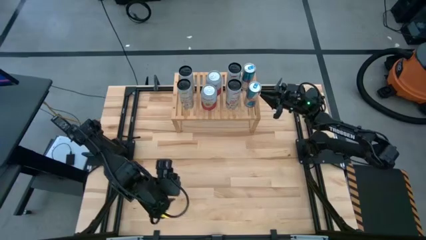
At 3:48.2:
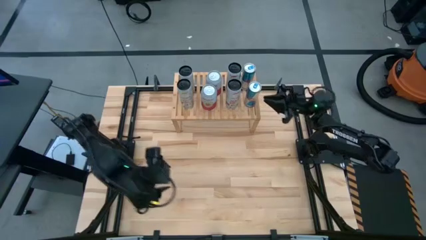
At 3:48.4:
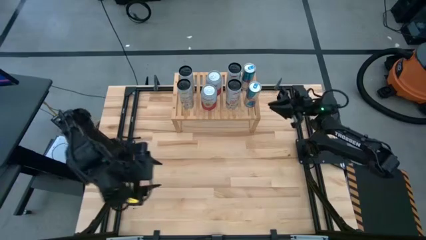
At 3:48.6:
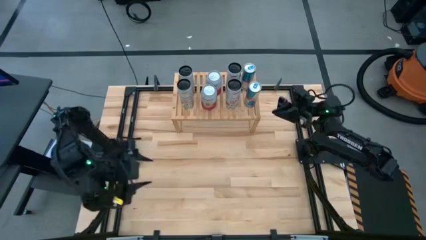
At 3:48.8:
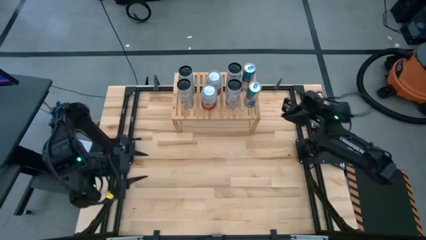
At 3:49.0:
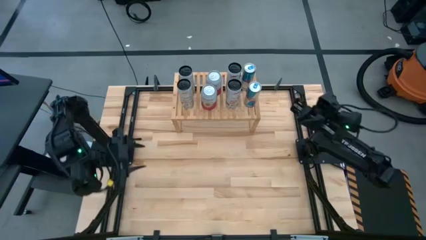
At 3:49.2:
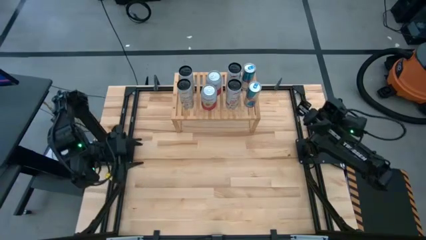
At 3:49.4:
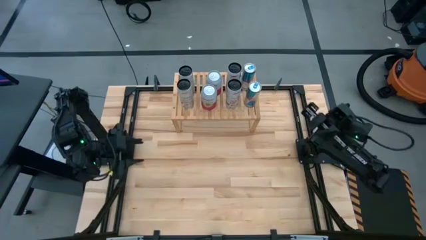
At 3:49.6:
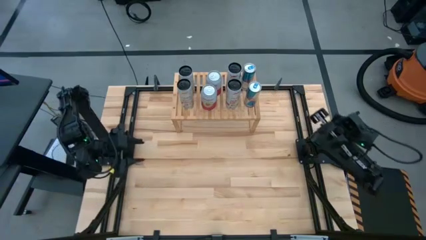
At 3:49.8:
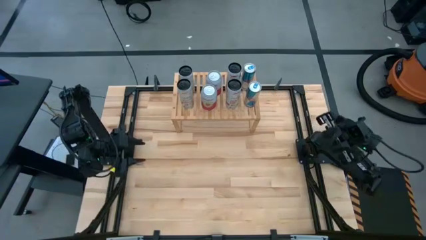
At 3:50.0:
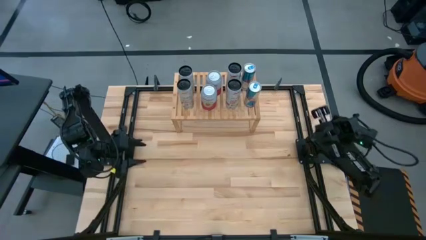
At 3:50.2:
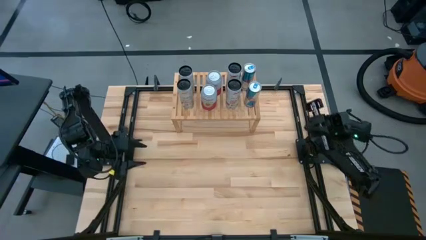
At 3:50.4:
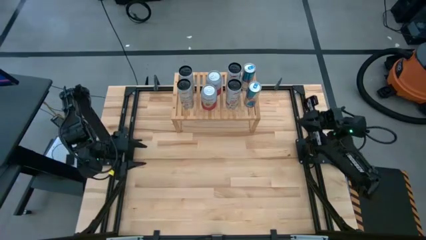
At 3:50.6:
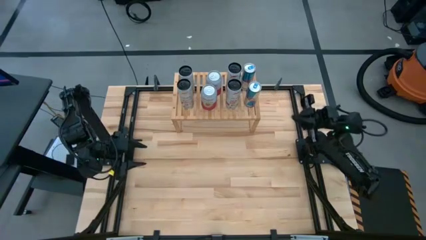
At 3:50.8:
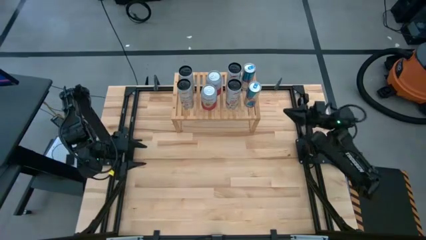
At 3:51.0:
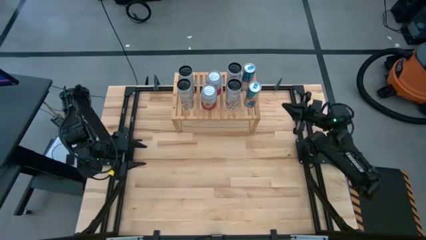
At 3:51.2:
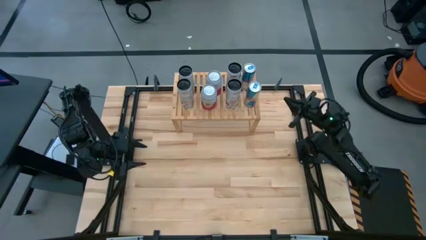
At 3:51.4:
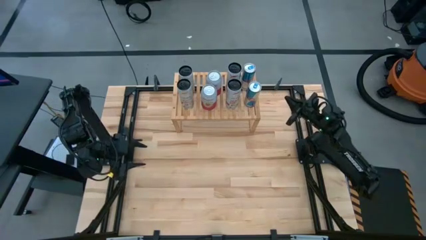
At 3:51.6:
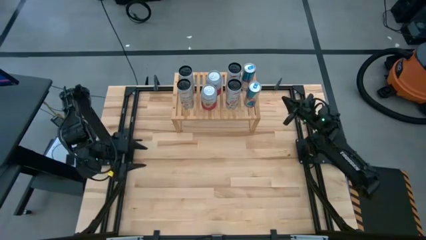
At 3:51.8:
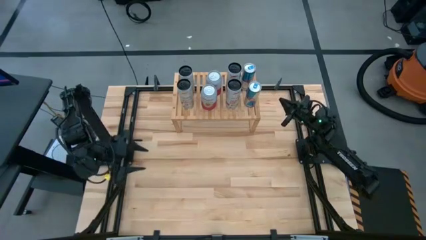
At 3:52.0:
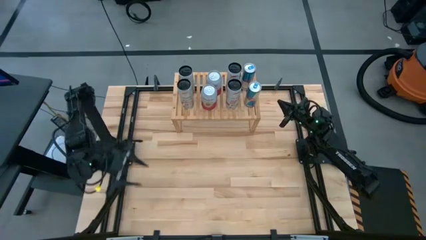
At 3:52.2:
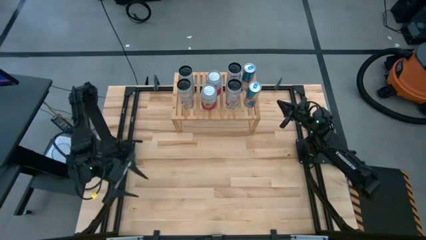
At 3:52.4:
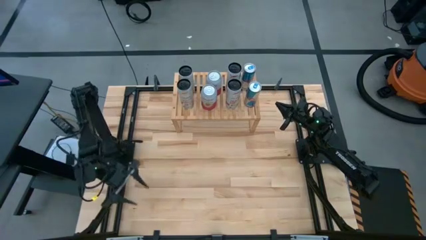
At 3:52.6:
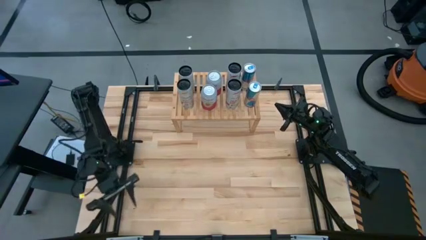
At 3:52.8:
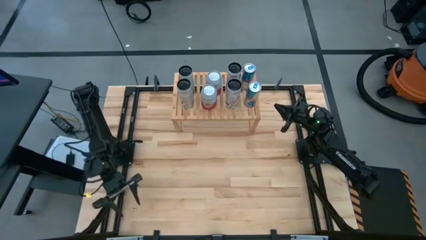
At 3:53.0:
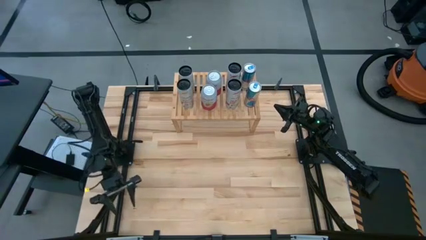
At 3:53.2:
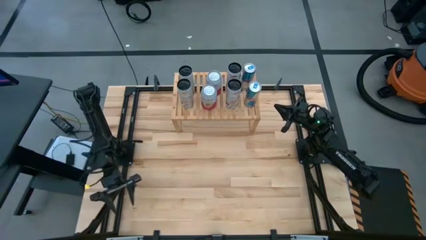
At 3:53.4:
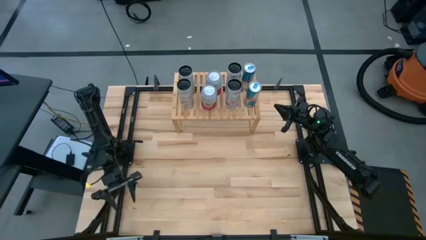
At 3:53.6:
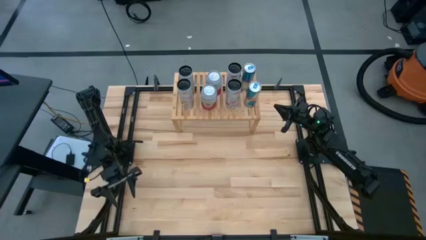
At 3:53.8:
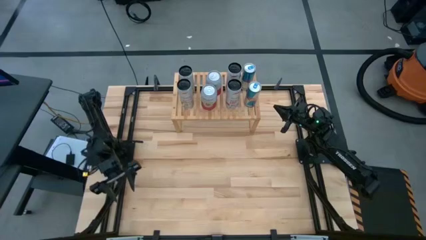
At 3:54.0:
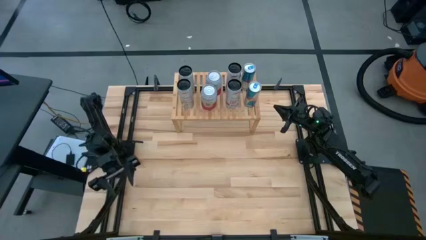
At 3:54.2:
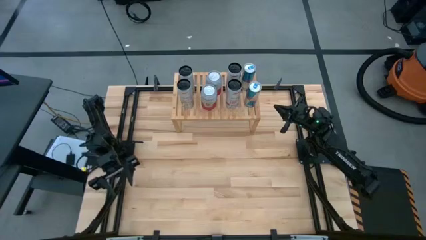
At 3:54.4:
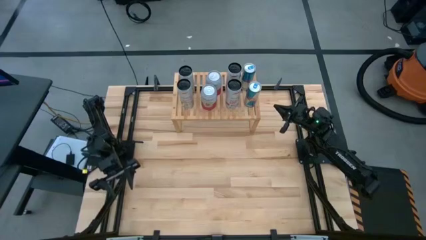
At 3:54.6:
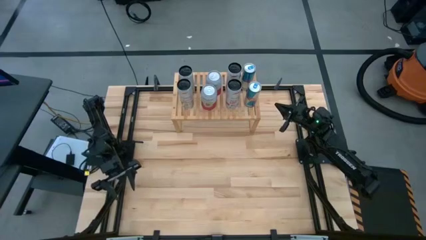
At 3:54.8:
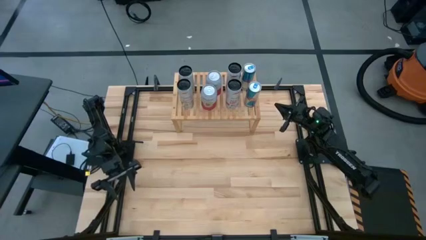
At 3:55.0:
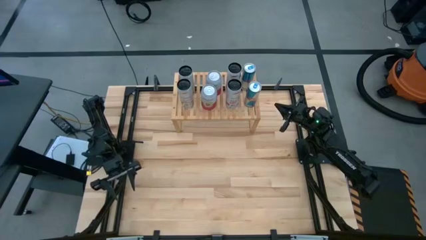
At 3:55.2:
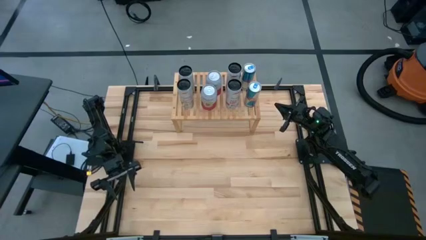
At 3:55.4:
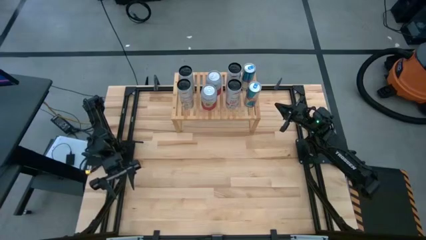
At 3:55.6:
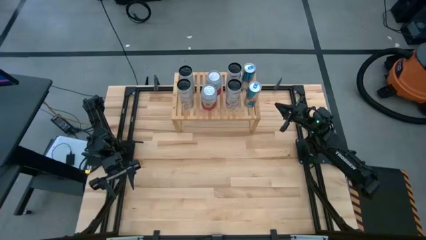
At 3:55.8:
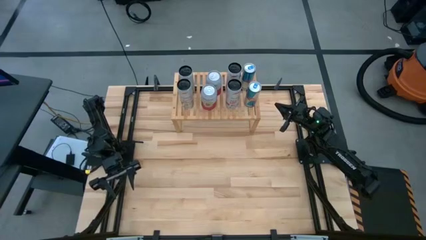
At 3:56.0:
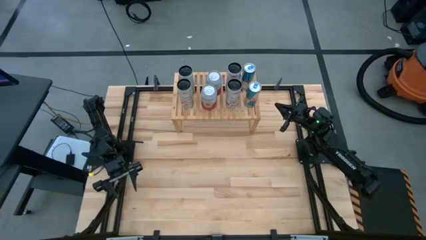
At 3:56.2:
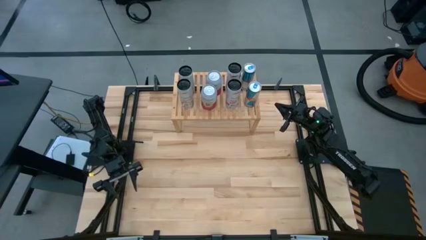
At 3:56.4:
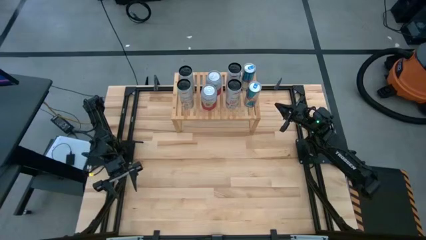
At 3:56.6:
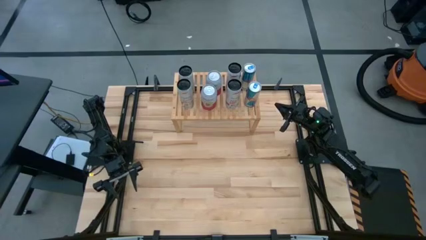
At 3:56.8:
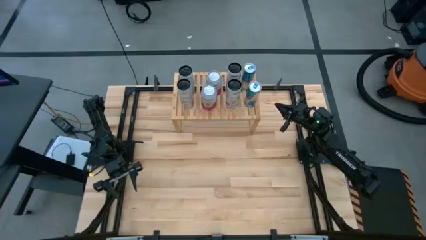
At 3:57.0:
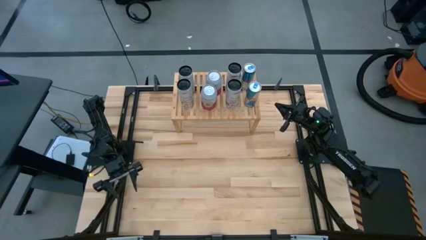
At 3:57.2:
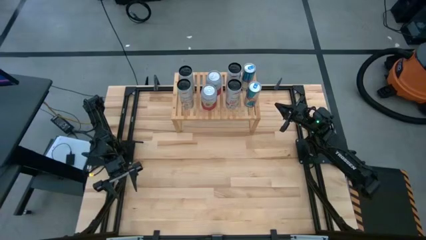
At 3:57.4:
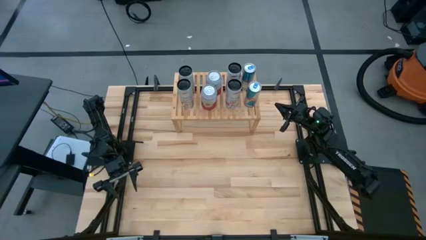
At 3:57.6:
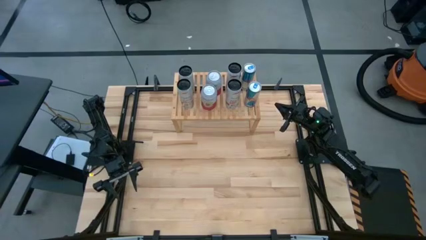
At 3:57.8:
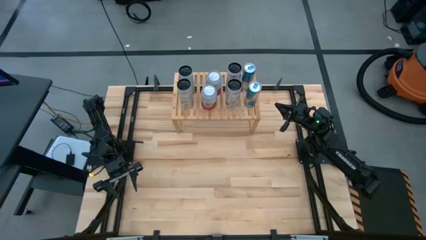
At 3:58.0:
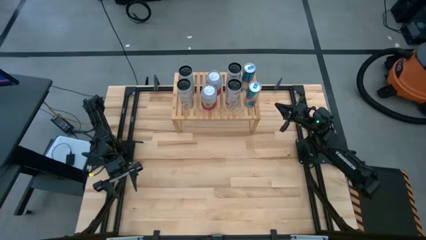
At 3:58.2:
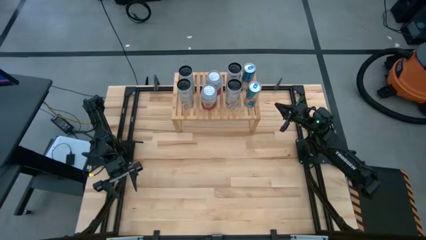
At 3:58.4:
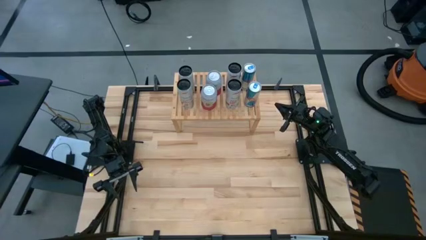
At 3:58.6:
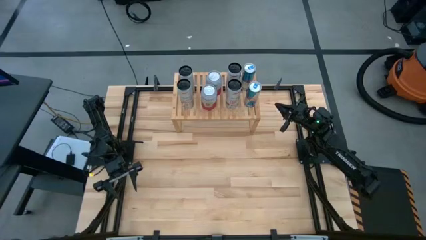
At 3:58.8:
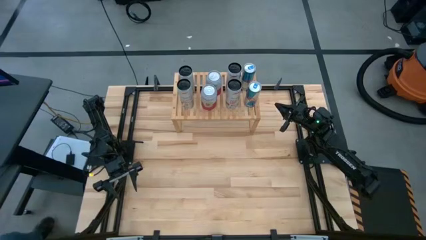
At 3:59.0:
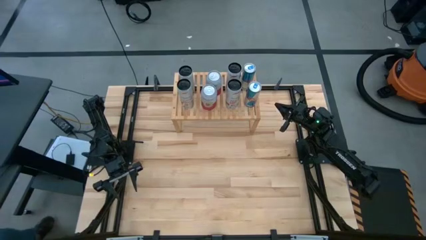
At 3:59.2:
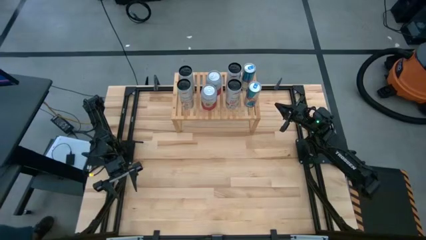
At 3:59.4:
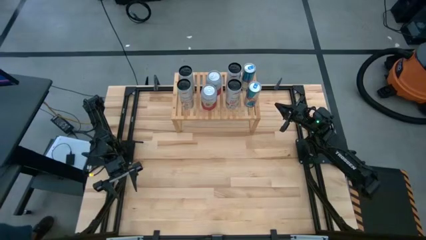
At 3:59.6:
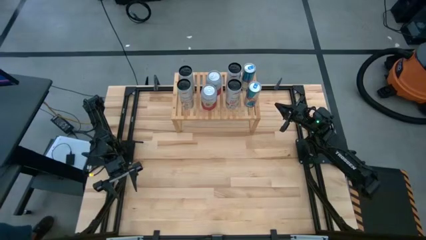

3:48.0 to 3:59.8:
Task: Place canned beverage on shelf
Return to Home Position
